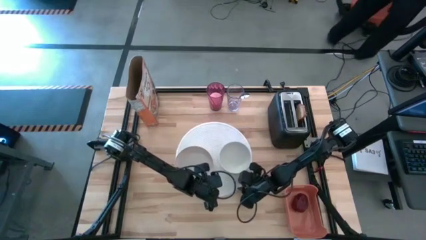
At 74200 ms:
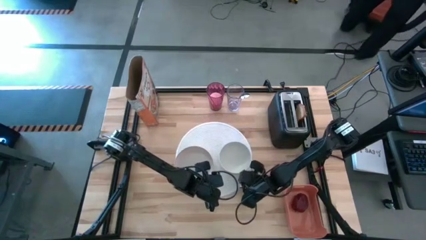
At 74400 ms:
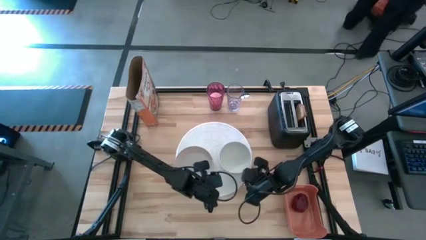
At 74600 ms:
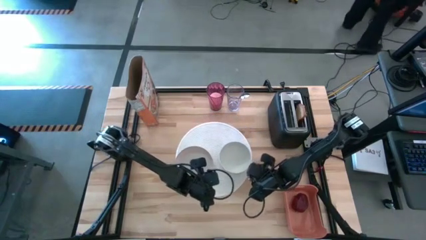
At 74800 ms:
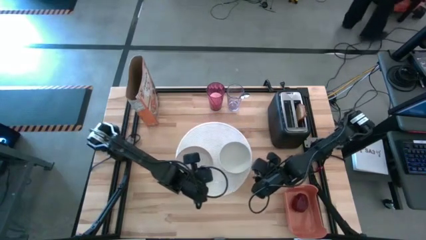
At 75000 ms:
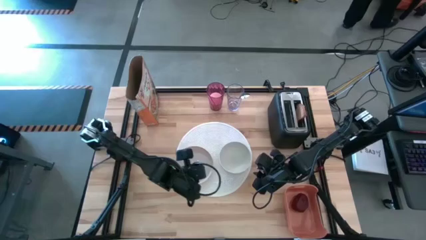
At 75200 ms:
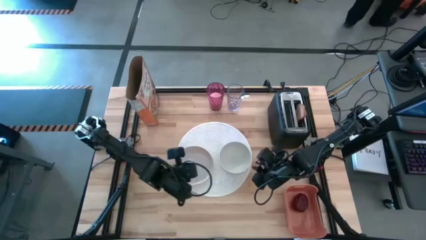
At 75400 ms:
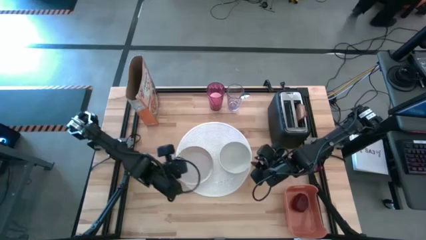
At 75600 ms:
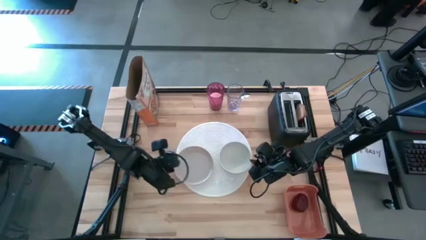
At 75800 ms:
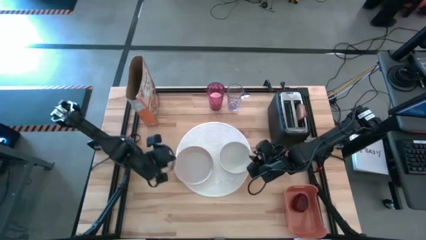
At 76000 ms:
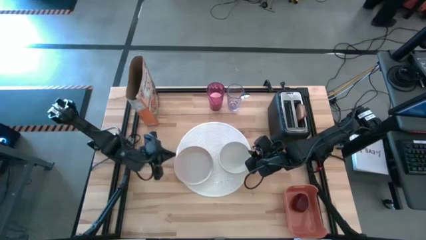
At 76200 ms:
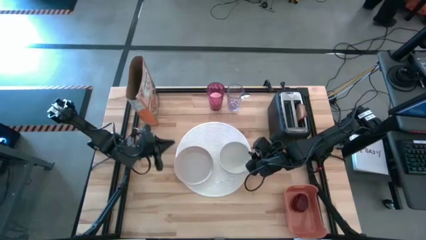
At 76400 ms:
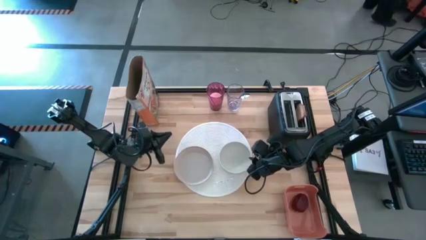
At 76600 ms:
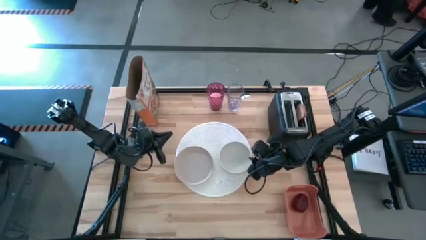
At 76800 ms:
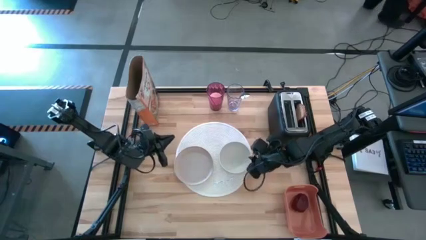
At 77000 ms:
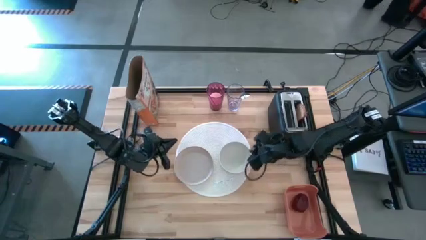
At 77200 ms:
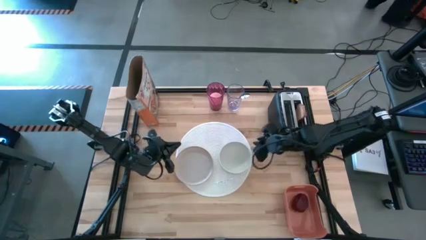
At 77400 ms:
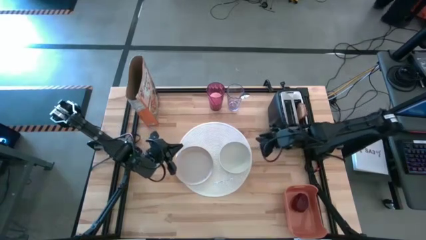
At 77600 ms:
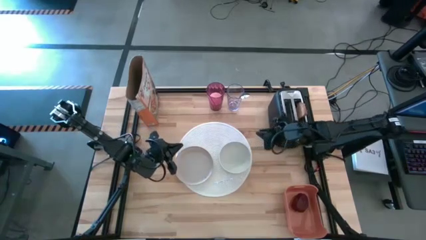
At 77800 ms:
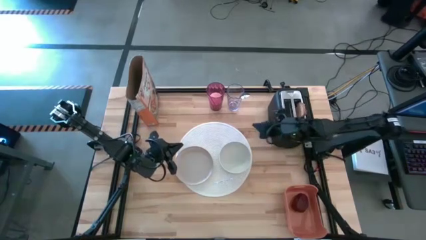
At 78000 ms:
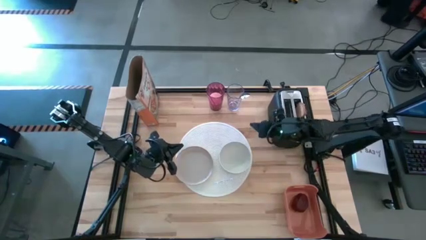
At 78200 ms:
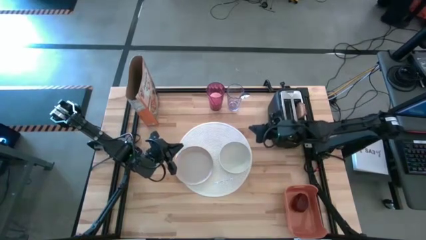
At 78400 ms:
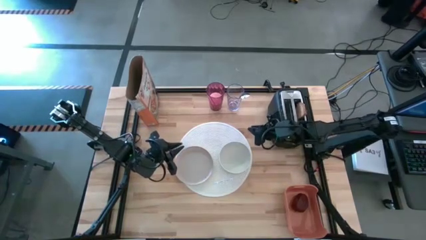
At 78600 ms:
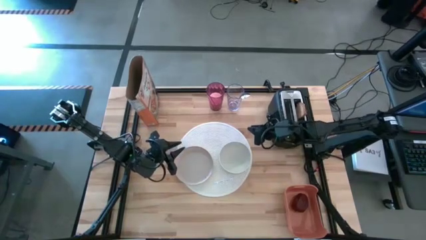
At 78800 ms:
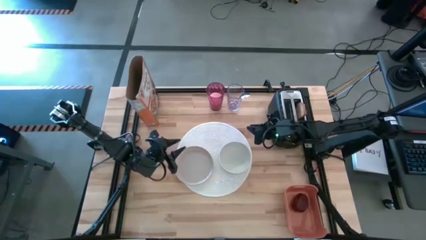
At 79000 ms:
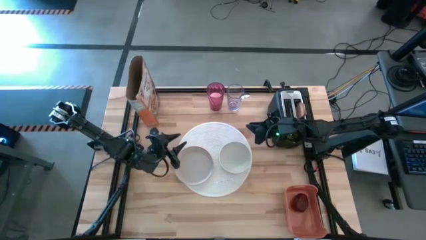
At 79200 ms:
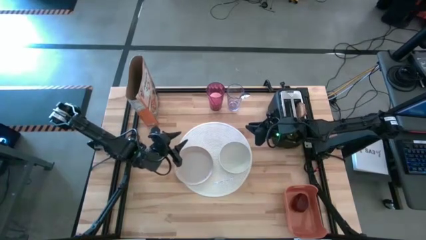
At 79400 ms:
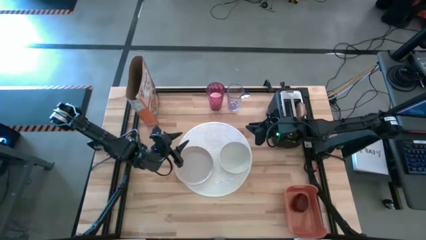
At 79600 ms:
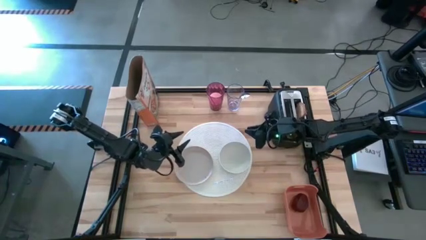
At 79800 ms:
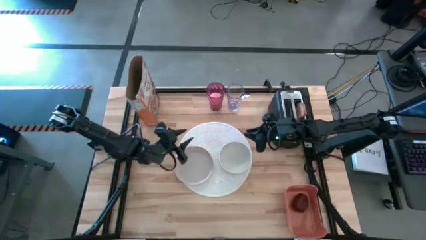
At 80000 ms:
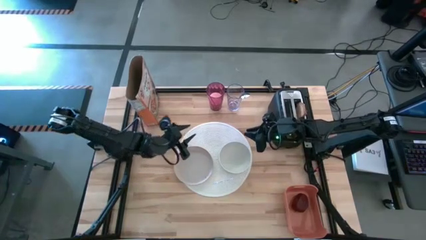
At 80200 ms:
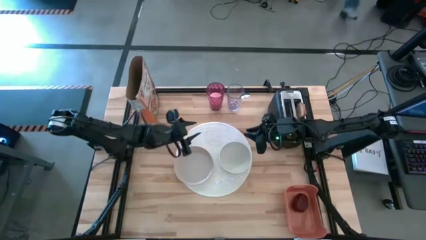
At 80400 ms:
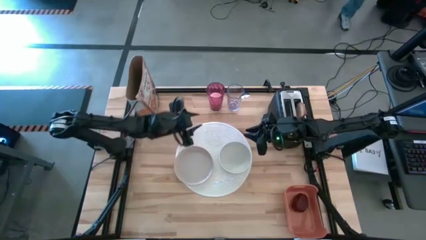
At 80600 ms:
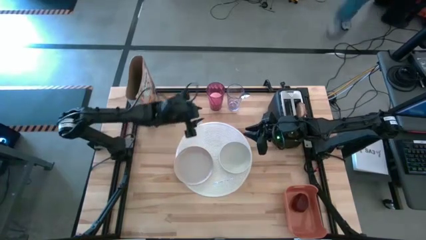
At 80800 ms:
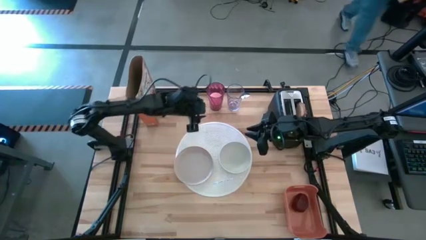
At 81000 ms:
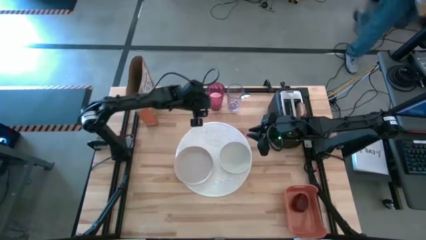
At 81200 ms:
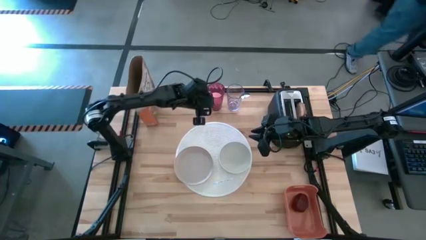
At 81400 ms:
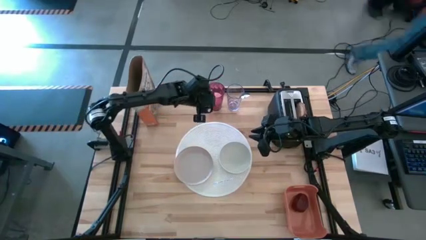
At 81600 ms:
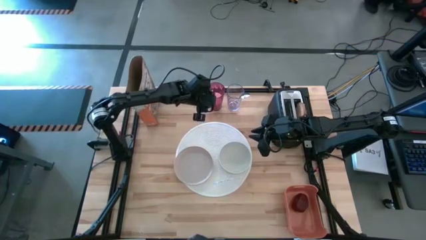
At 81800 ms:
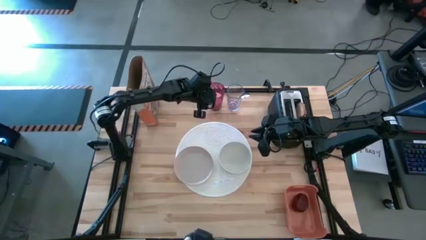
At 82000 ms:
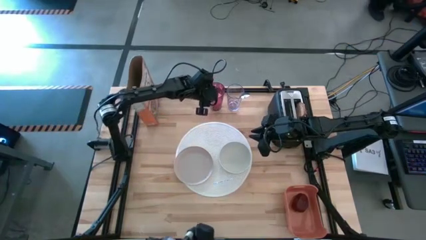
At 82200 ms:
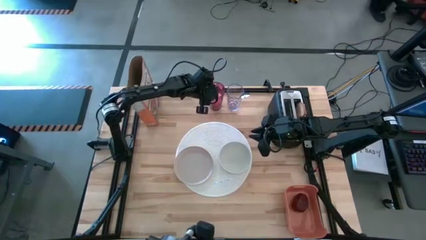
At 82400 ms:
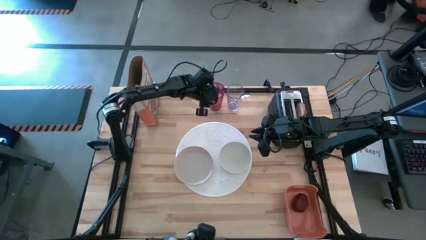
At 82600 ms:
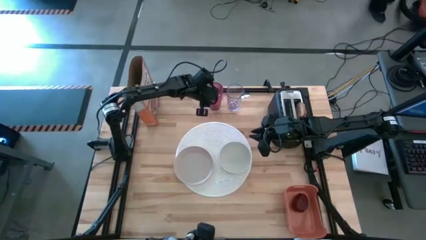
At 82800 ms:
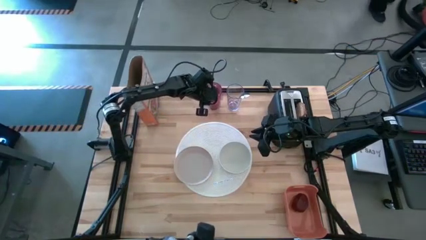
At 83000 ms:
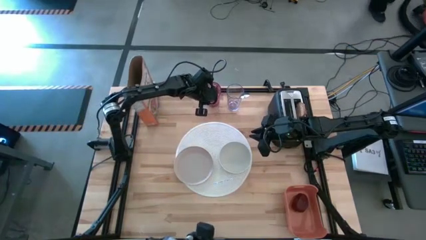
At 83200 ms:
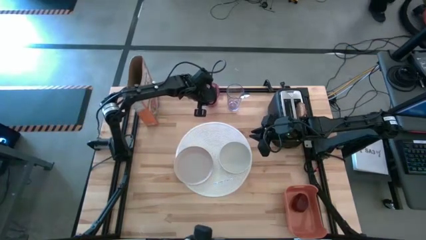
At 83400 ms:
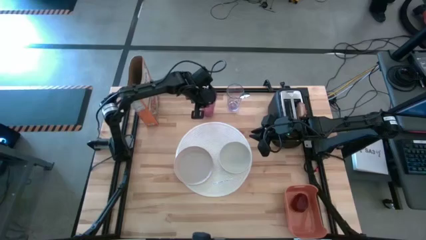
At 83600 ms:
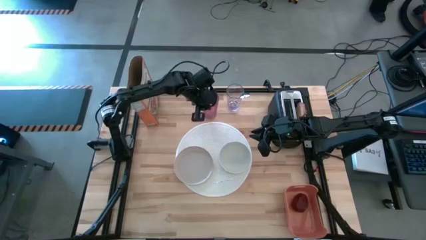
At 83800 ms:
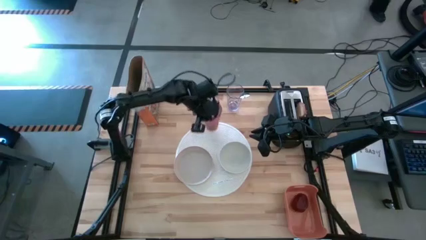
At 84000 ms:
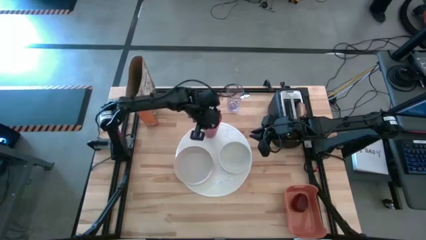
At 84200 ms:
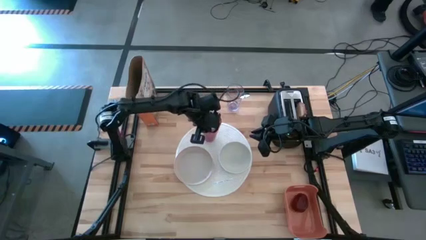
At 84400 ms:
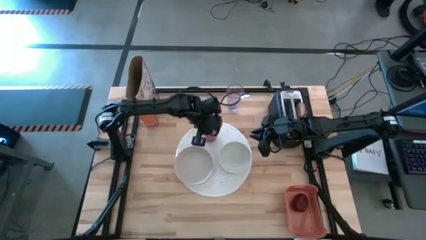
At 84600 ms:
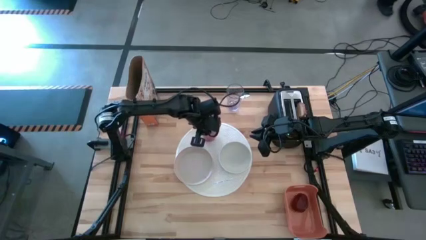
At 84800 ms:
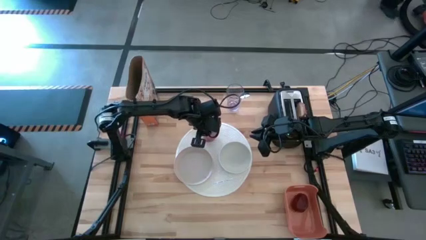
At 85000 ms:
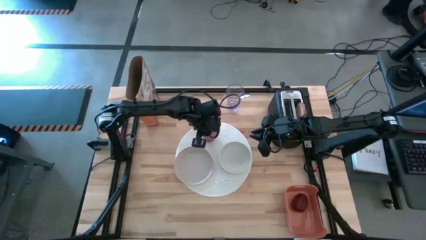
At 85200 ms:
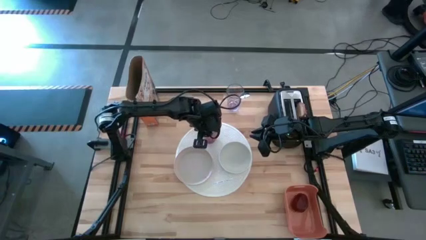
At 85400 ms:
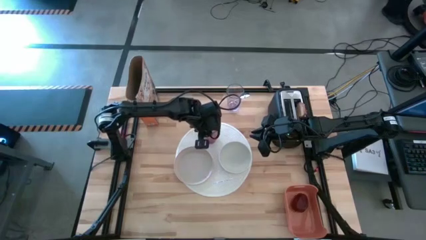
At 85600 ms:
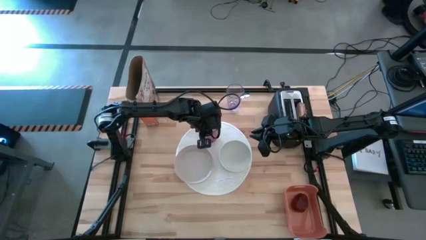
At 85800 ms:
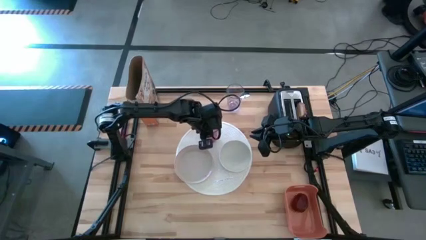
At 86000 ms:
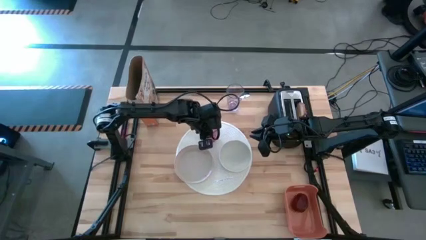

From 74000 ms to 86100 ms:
Task: Arrange a breakfast setting
Put the pink cup on the placemat to the top right of the gray plate

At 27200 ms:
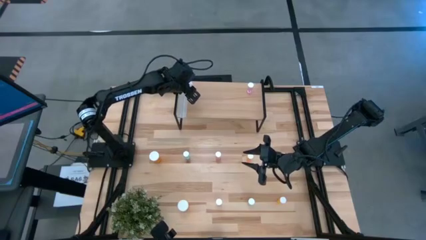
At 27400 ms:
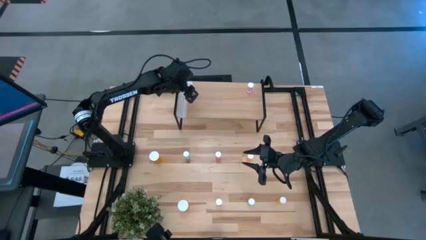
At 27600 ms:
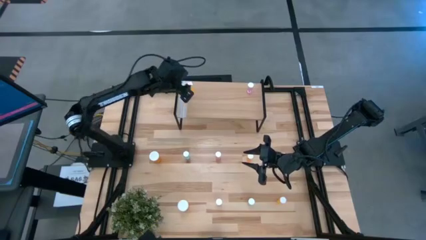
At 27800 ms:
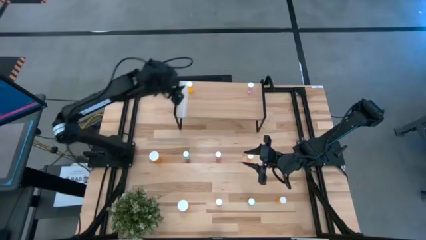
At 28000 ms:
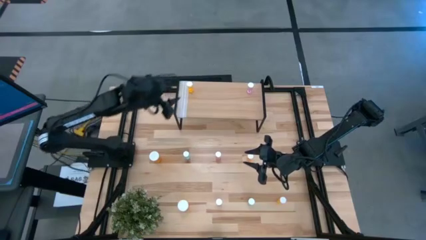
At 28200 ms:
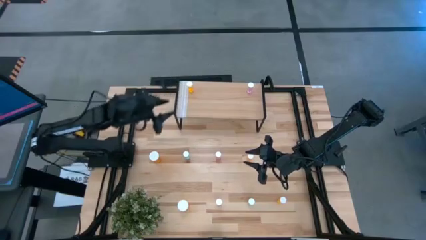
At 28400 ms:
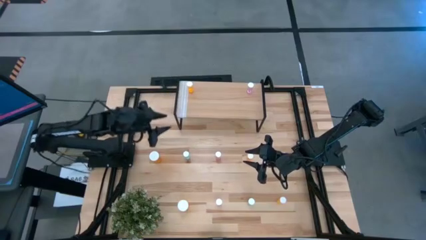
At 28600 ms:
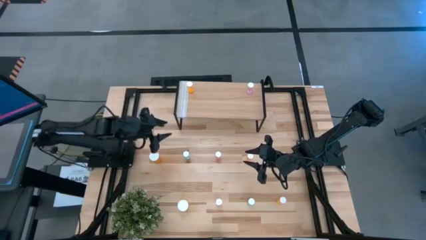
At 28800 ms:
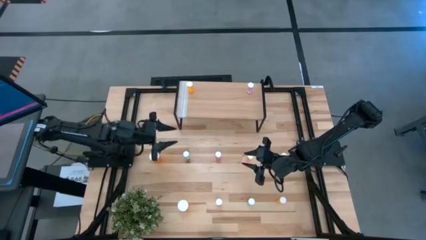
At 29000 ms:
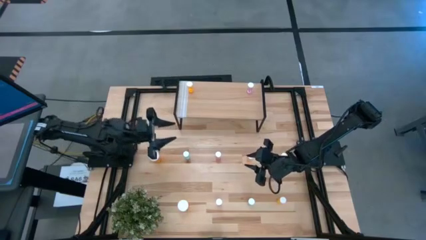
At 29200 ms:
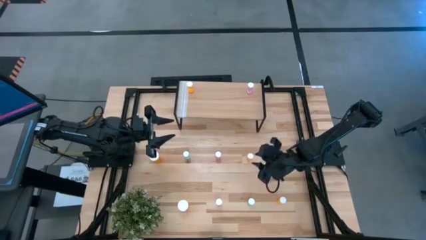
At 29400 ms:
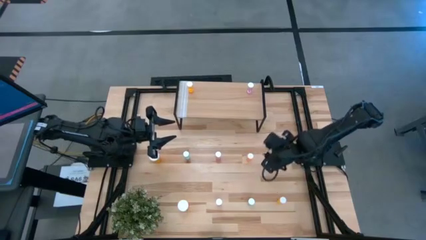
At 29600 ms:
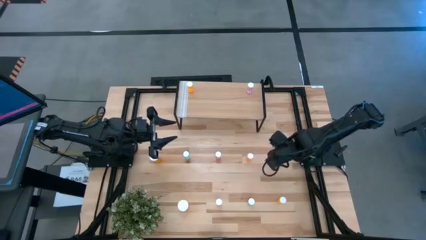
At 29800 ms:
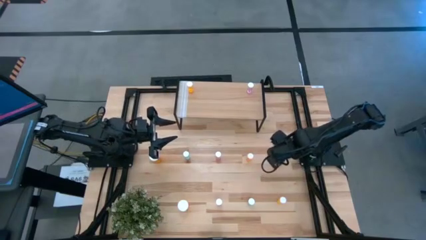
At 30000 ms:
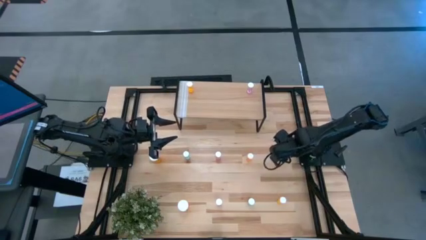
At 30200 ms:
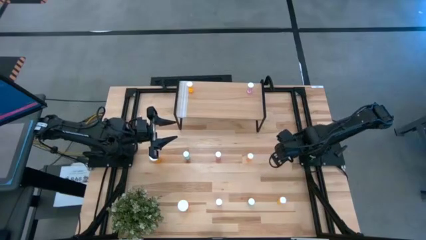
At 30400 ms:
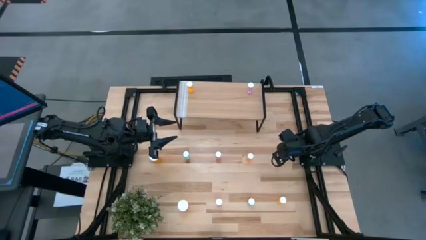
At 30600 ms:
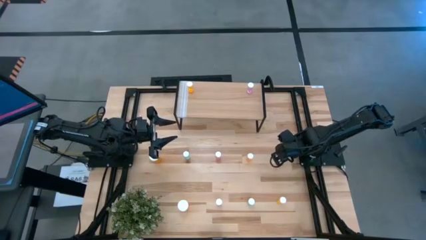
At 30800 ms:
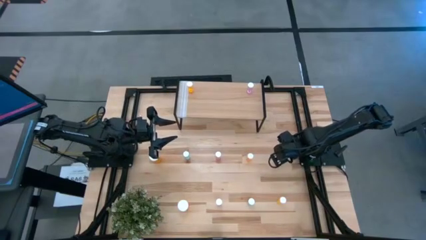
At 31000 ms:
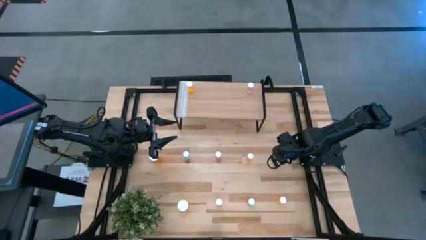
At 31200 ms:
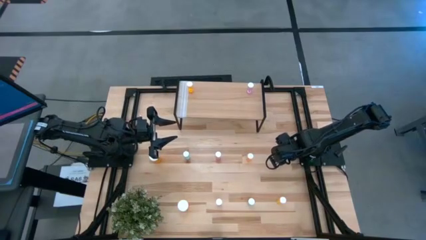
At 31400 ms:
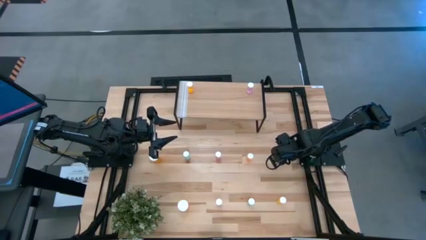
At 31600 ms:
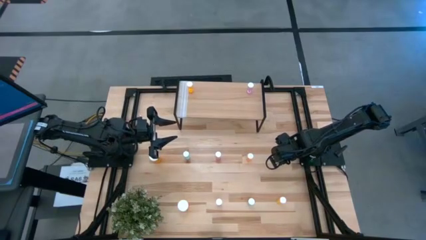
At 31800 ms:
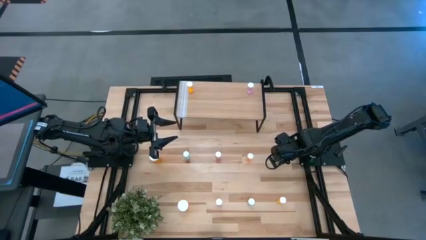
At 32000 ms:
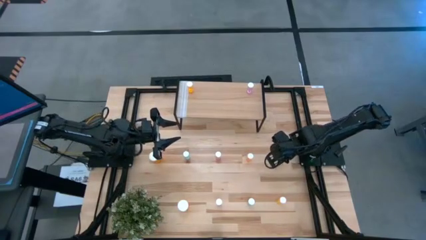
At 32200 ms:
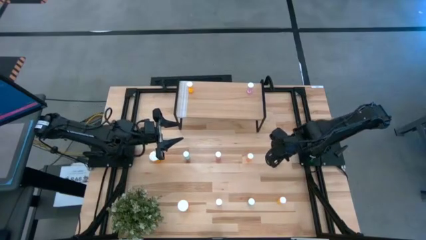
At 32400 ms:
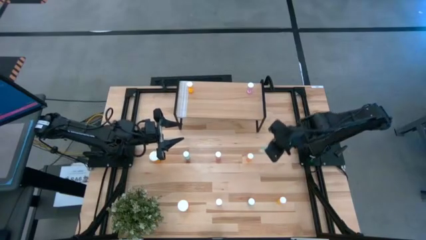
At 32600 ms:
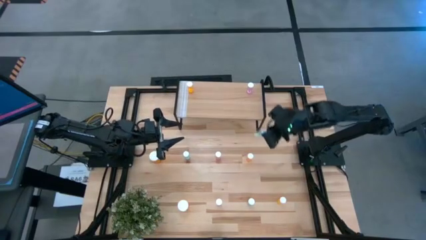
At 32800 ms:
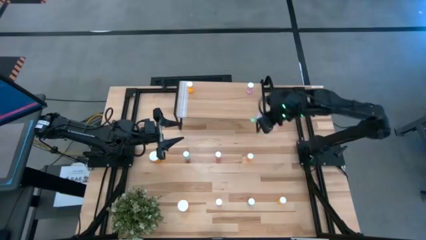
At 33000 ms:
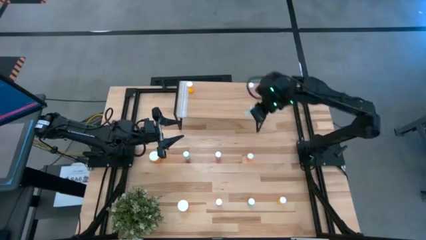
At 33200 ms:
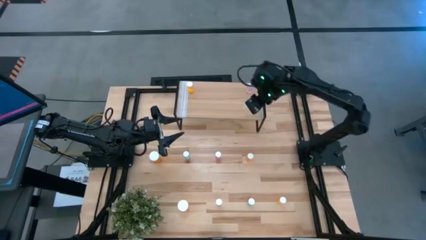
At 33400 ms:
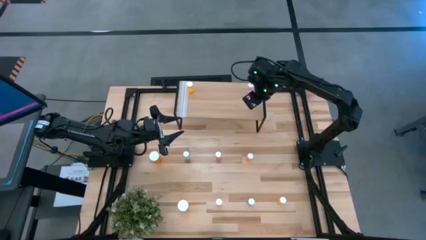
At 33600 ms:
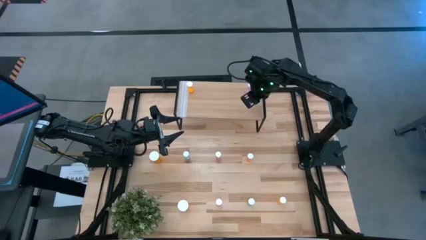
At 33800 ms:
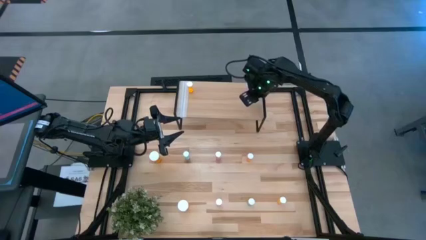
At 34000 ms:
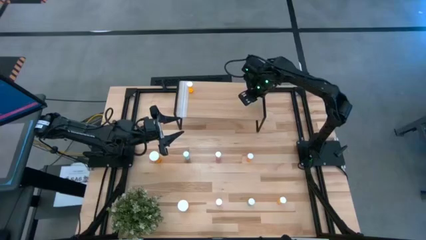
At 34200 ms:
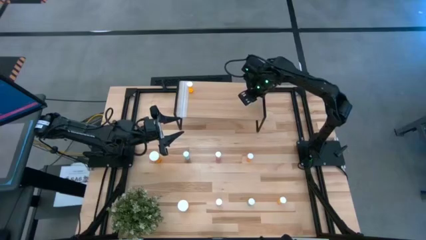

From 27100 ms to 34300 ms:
Task: Pick and place medicine bottles onto shelf by color
Put the top right blue small pill bottle on the shelf
